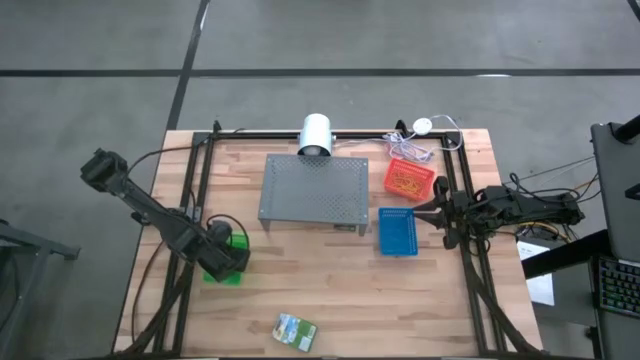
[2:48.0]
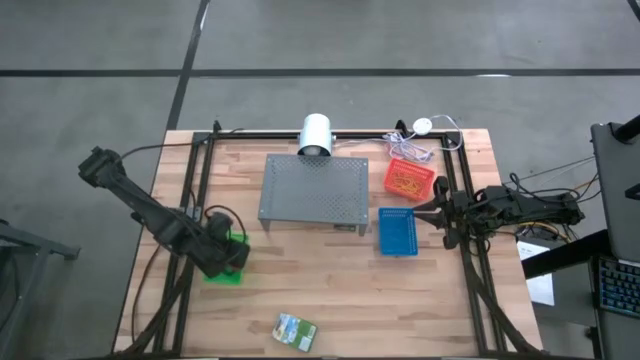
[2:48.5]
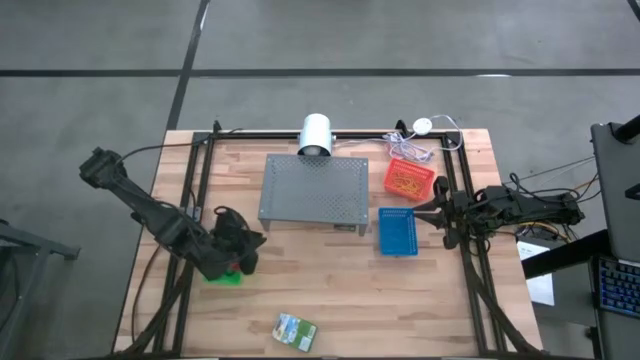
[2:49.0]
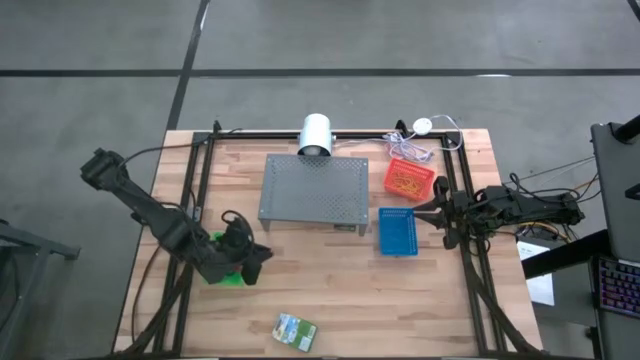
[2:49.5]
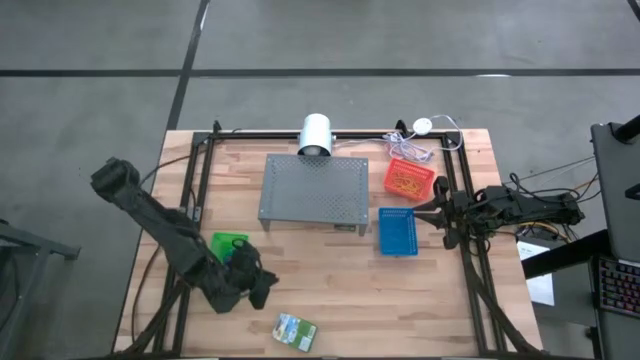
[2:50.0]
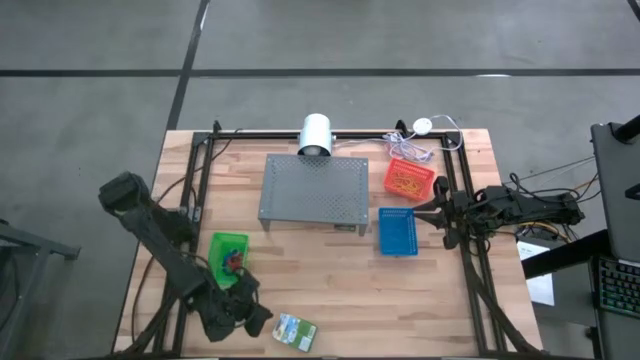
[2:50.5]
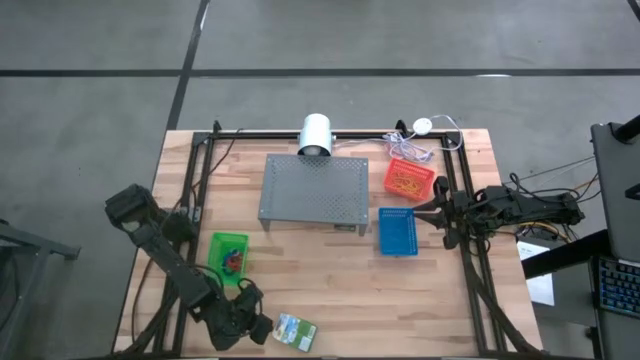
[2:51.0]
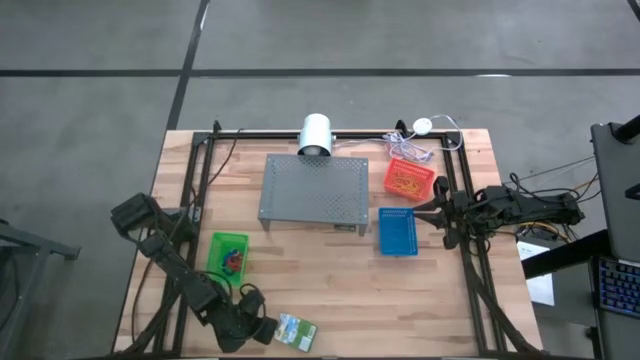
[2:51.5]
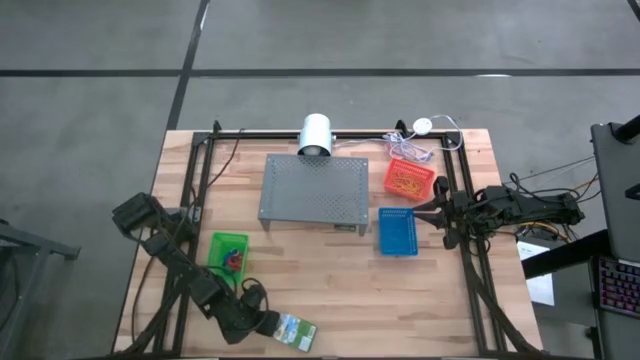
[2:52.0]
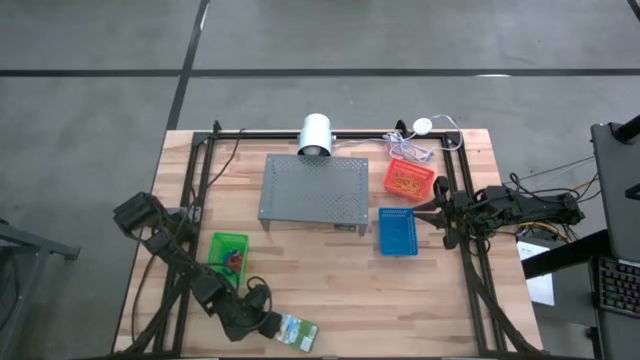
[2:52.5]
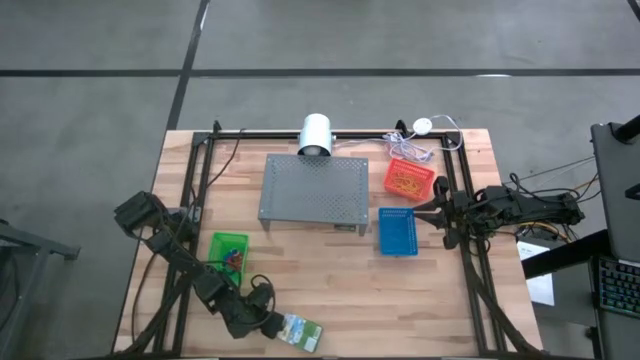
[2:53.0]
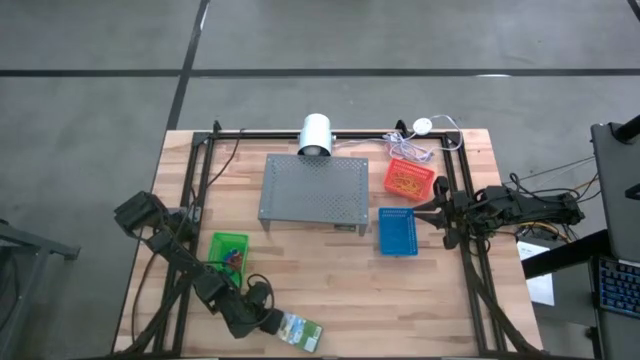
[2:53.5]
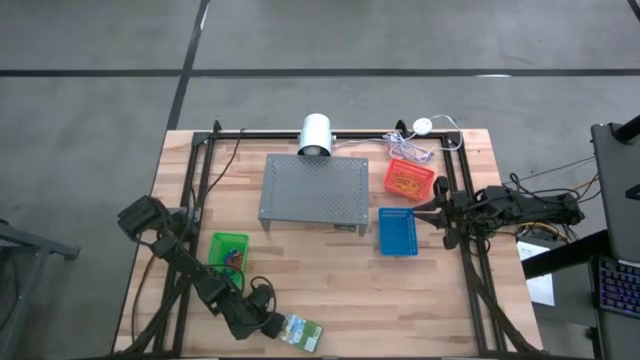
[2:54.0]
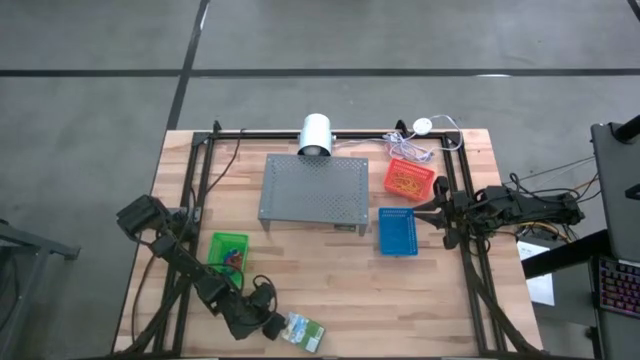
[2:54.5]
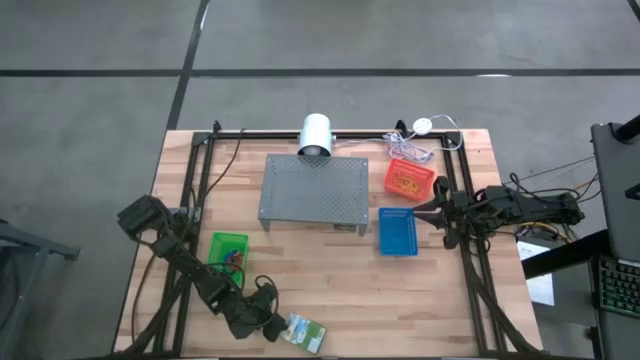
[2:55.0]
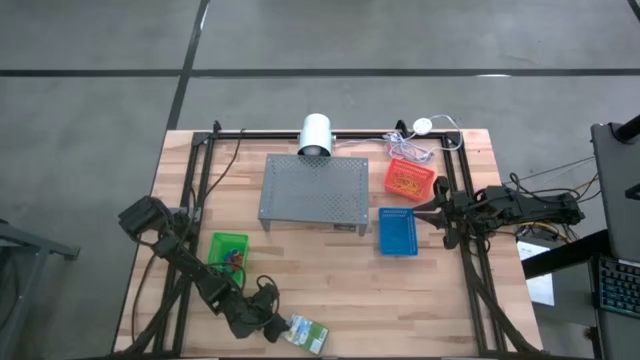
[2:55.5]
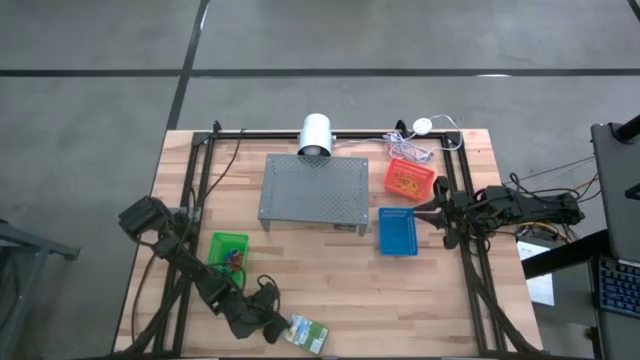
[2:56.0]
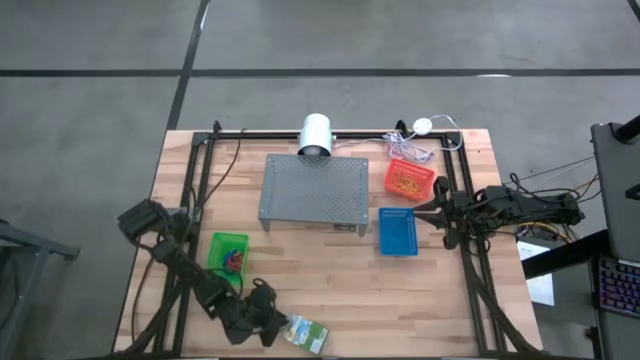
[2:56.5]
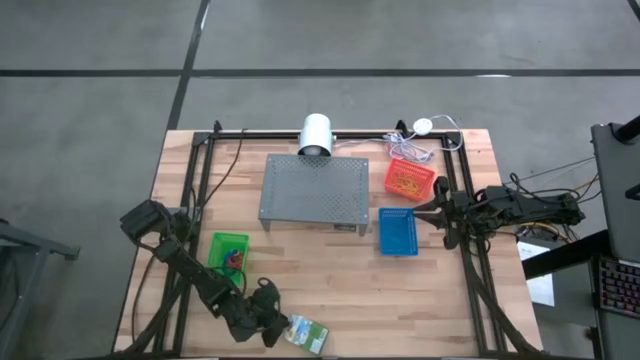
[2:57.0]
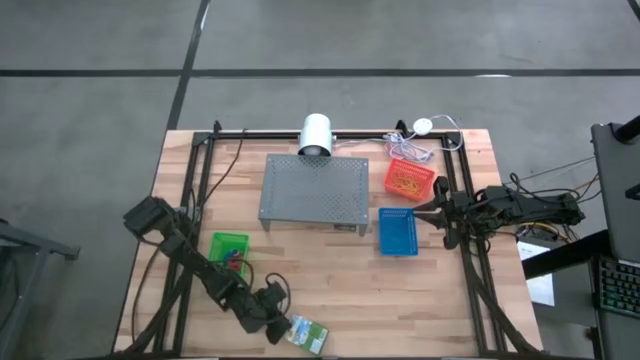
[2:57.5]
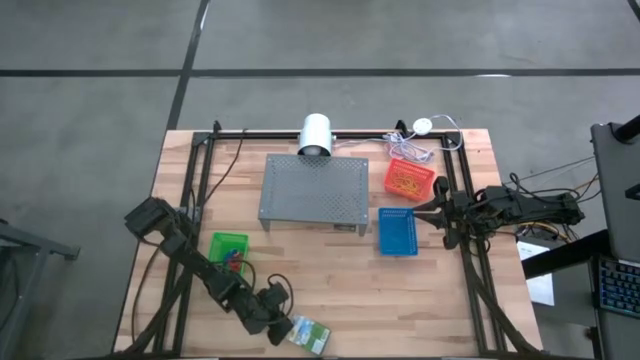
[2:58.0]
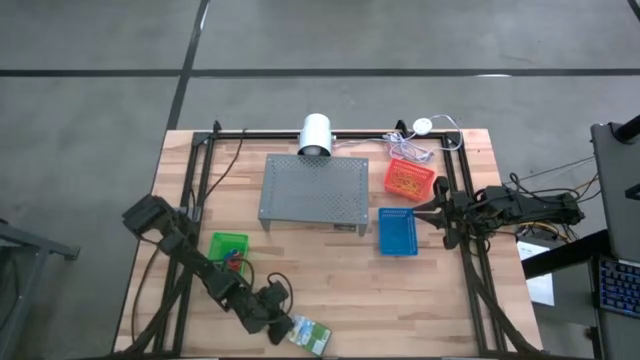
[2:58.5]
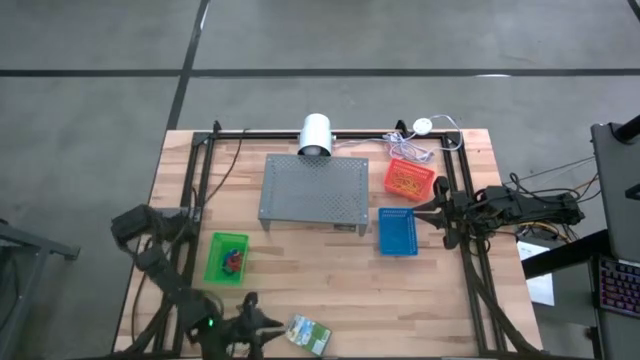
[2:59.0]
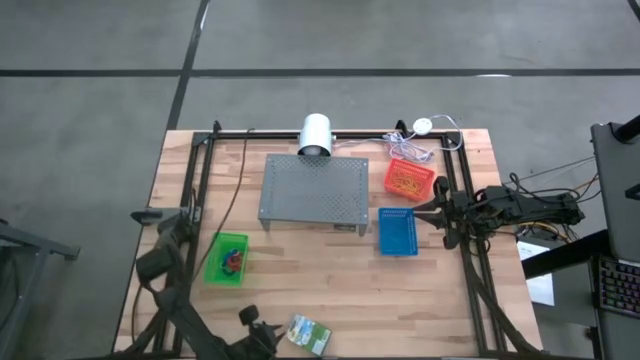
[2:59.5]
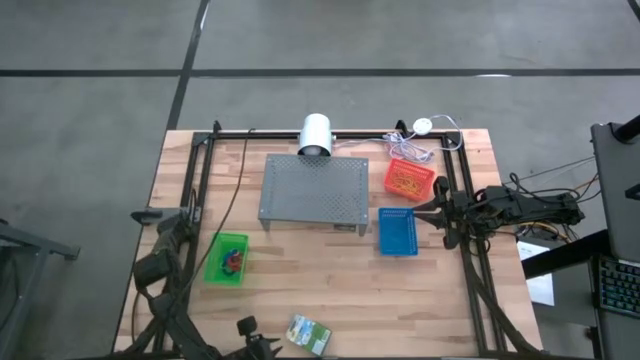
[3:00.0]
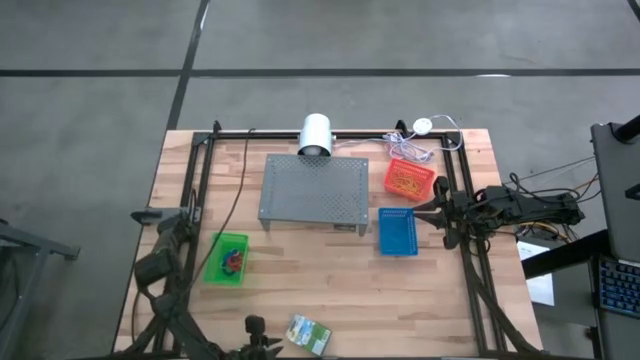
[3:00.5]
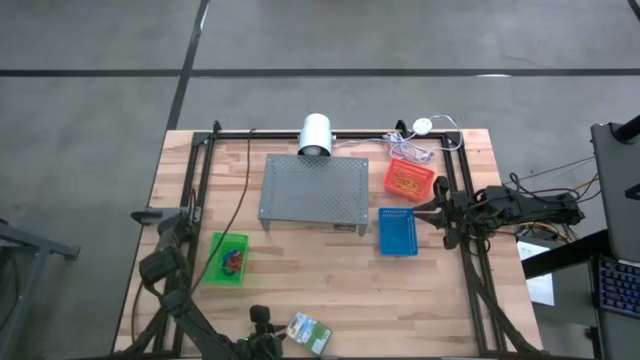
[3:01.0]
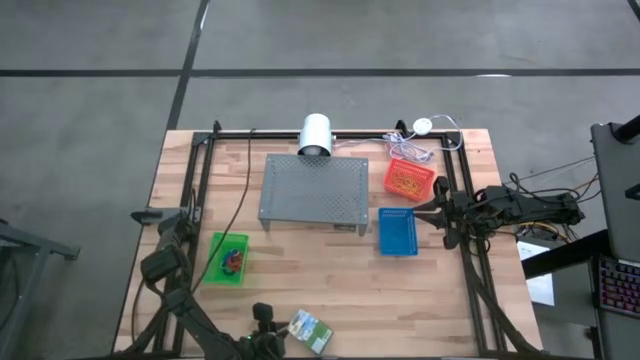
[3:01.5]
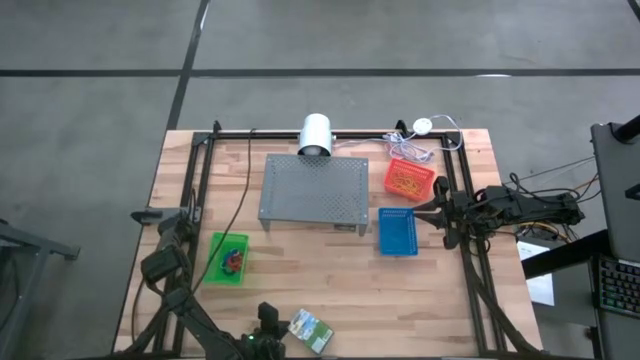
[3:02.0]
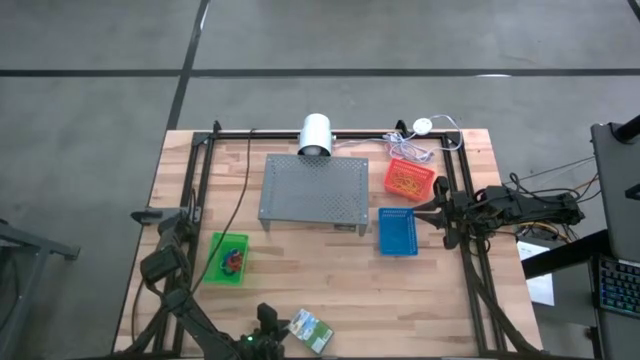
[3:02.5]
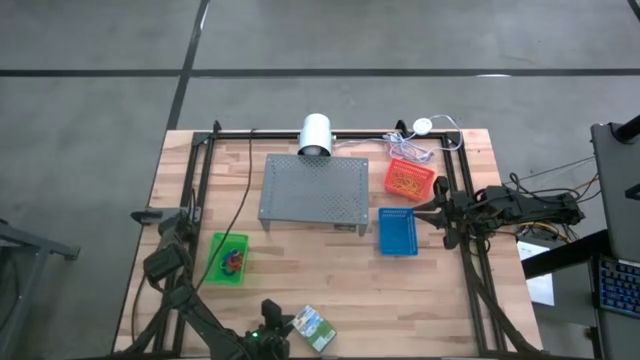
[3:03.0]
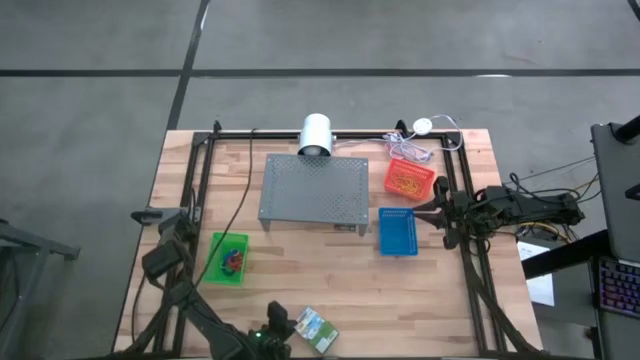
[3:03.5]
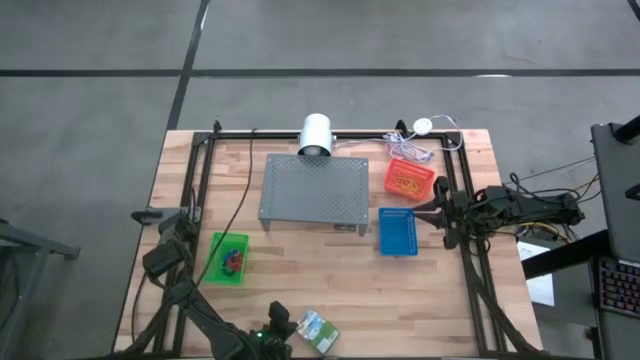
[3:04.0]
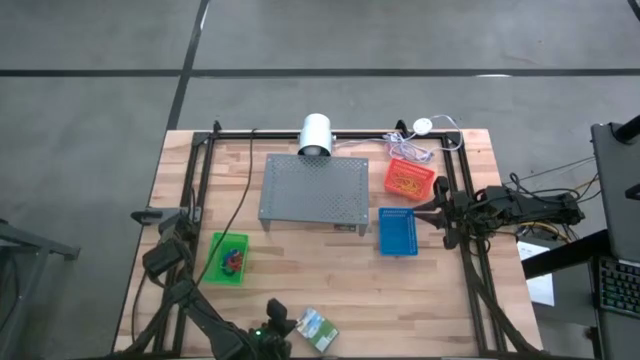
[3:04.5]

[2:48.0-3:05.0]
Task: Pick & Place Office Desk Supplies
Put the bottom pack of yellow crayons into the blue bin

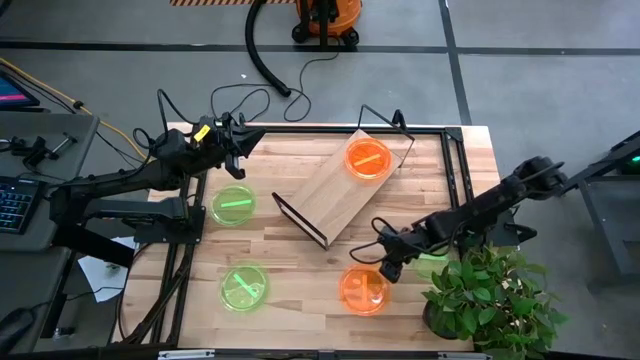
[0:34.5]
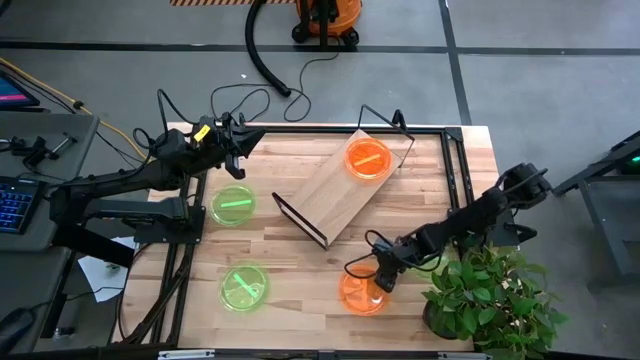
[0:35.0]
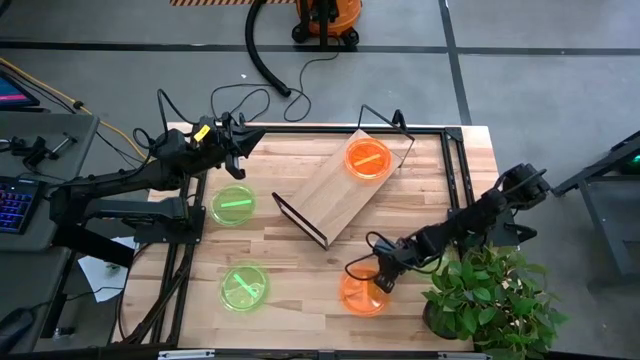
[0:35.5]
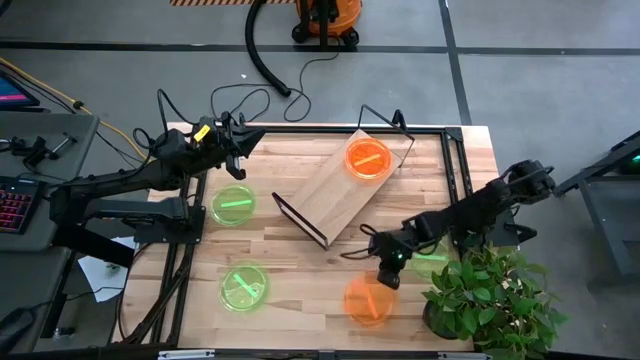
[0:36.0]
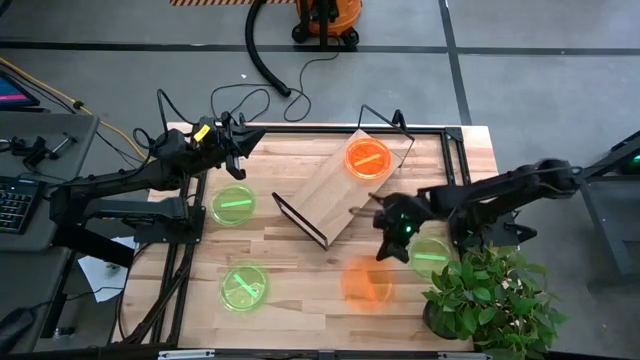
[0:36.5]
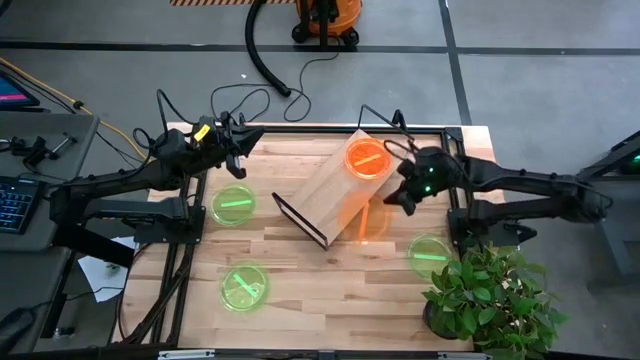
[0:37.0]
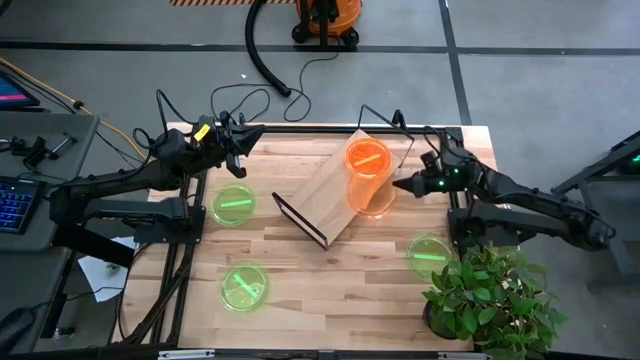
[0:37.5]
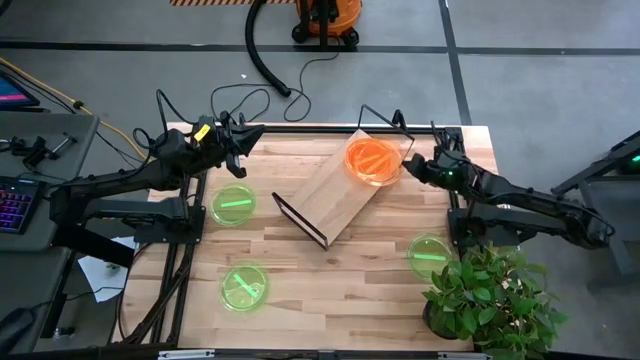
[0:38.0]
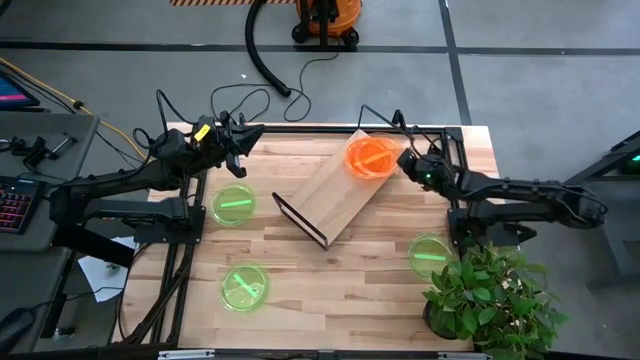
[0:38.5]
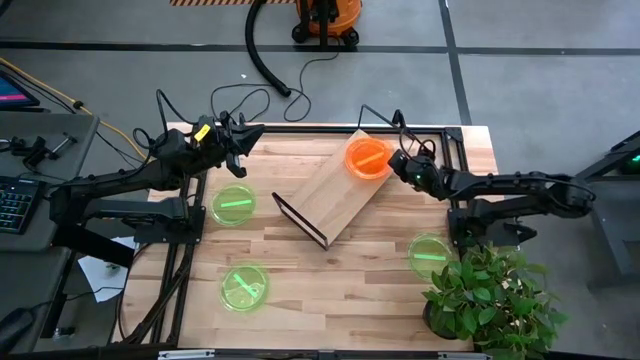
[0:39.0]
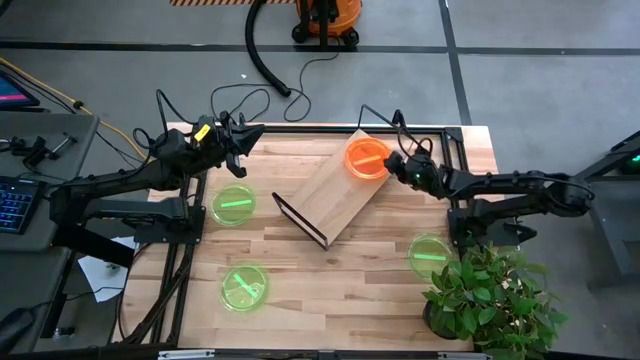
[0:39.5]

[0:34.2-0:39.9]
Task: Place and stack plates onto a shelf
Stack the orange plate on top of the orange plates on the shelf
